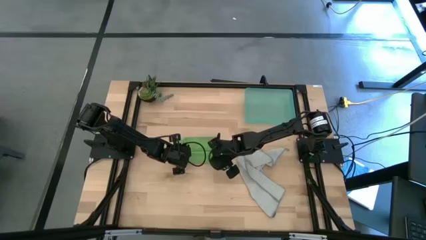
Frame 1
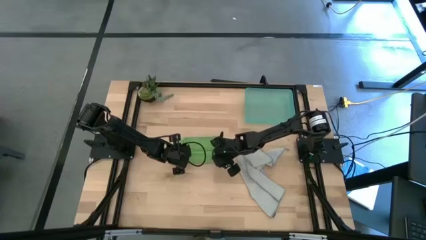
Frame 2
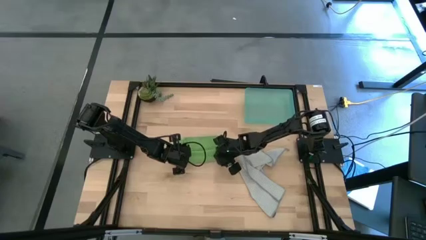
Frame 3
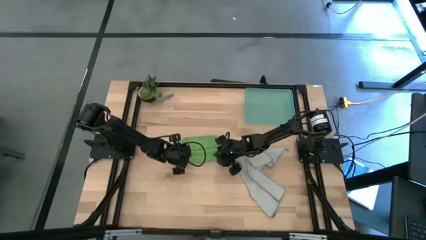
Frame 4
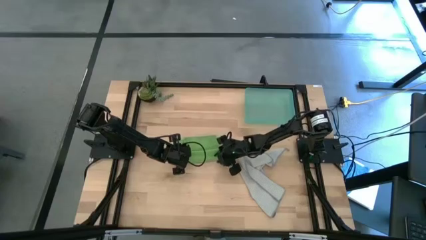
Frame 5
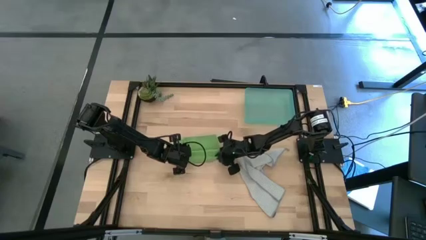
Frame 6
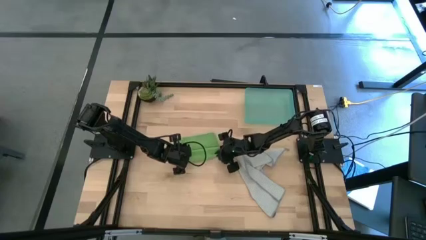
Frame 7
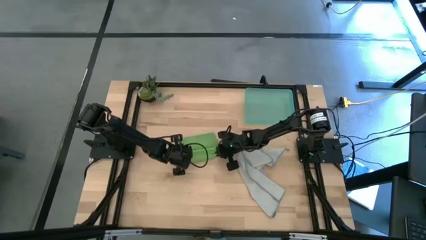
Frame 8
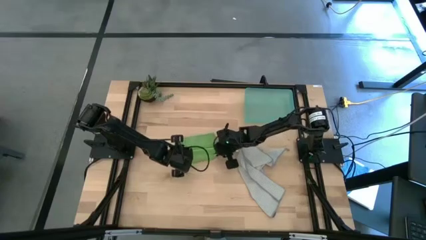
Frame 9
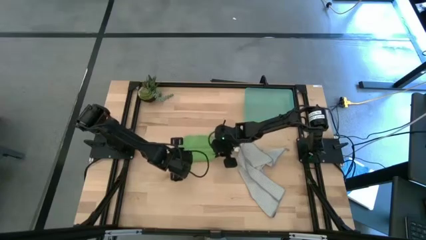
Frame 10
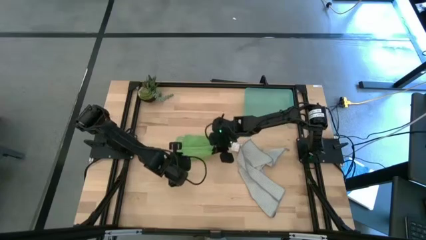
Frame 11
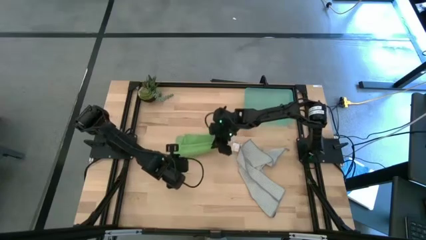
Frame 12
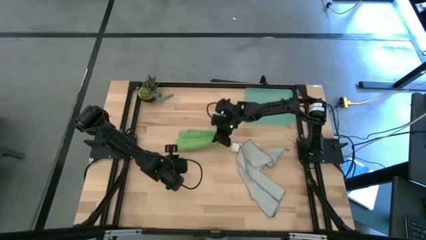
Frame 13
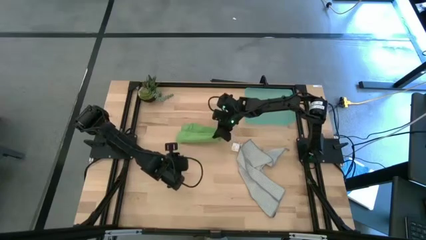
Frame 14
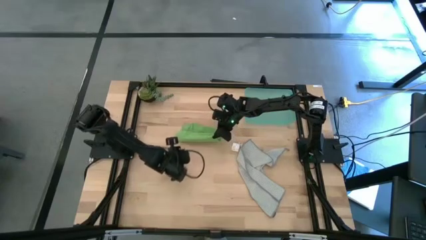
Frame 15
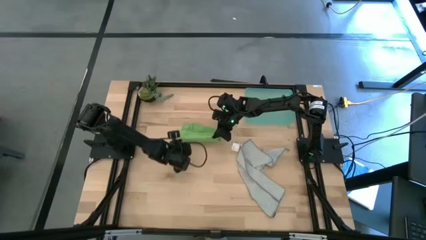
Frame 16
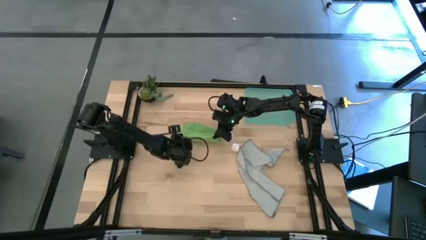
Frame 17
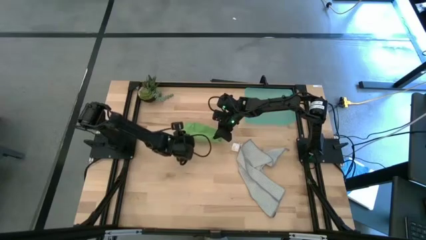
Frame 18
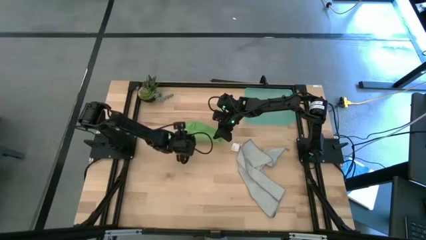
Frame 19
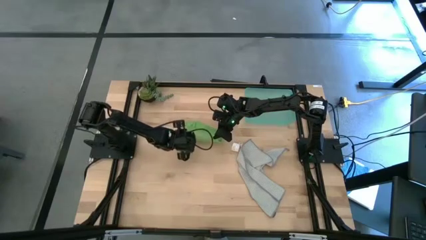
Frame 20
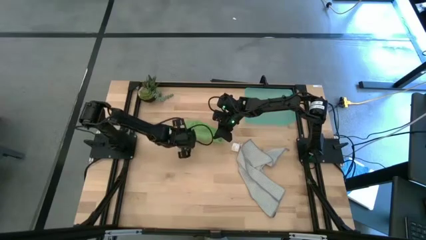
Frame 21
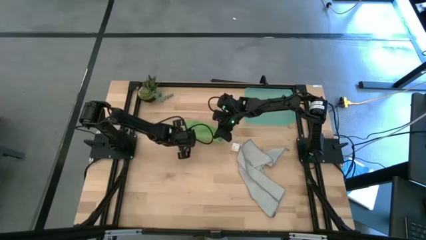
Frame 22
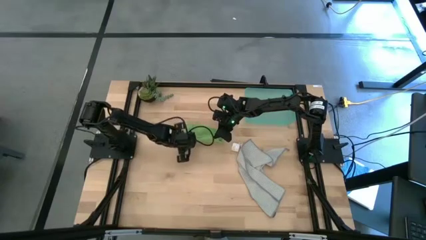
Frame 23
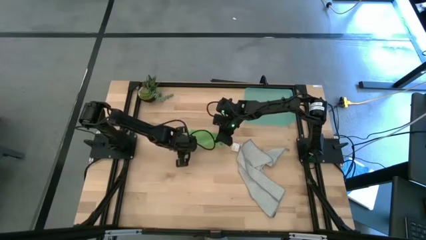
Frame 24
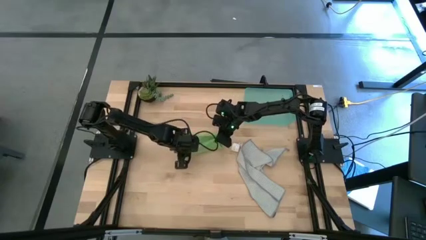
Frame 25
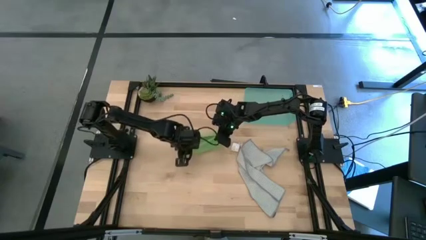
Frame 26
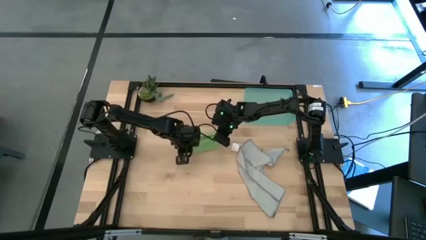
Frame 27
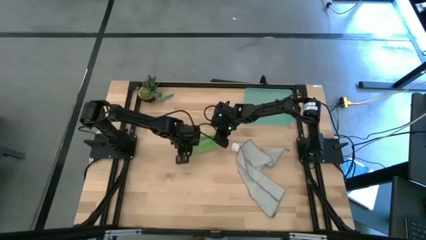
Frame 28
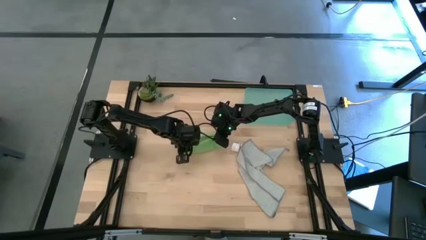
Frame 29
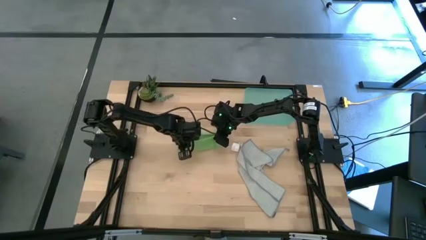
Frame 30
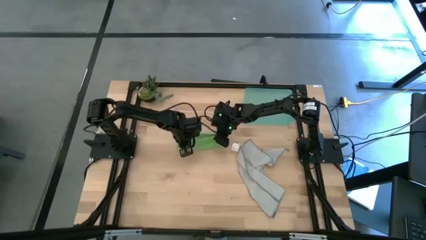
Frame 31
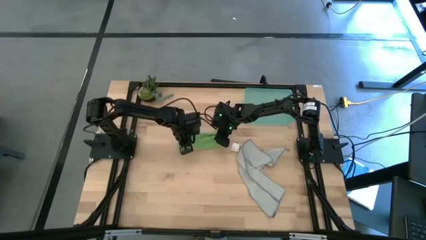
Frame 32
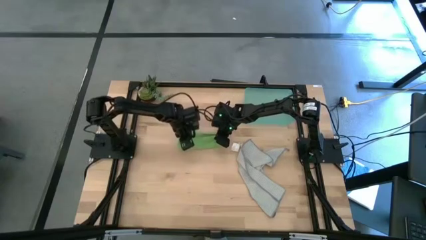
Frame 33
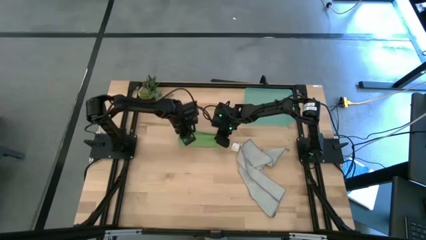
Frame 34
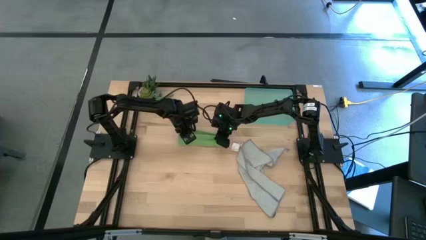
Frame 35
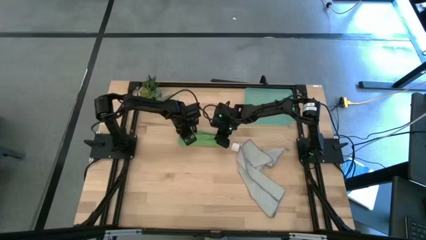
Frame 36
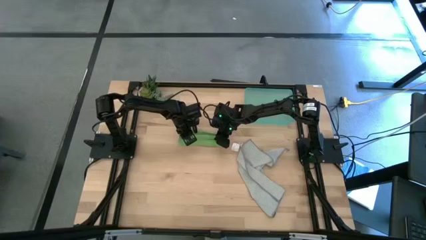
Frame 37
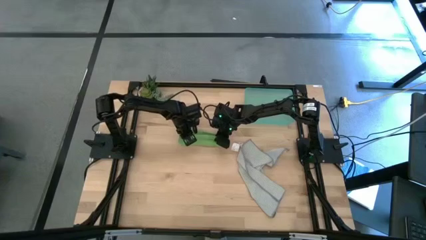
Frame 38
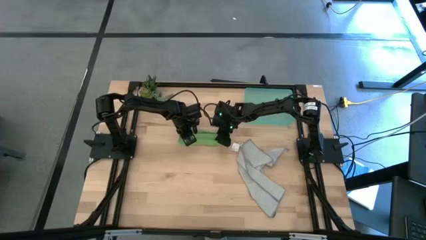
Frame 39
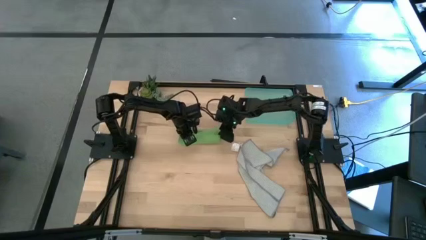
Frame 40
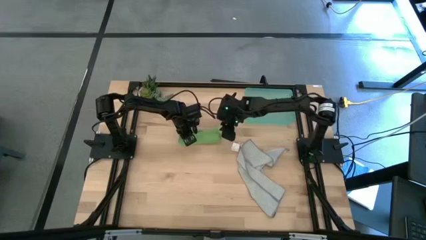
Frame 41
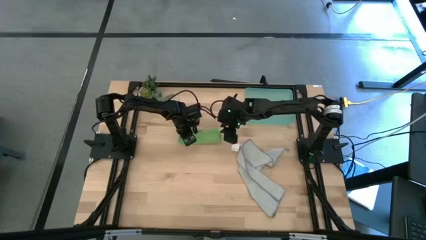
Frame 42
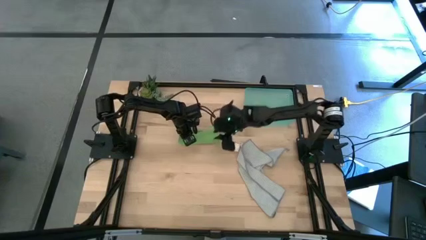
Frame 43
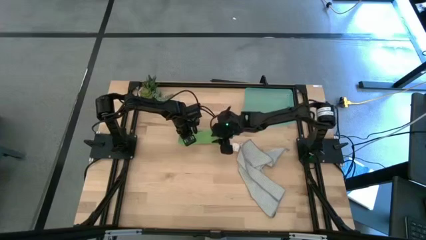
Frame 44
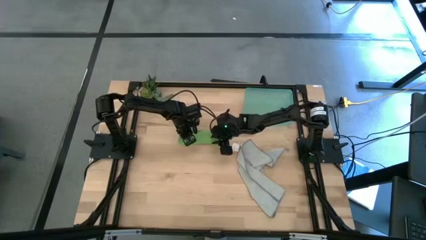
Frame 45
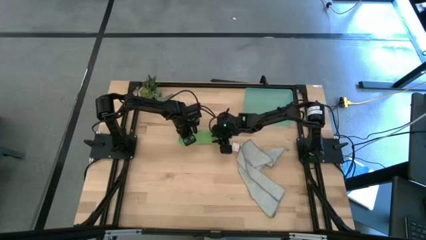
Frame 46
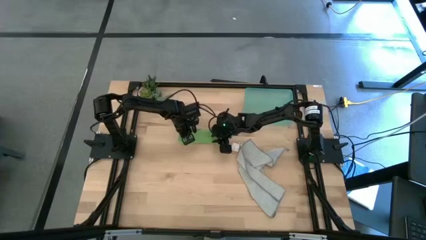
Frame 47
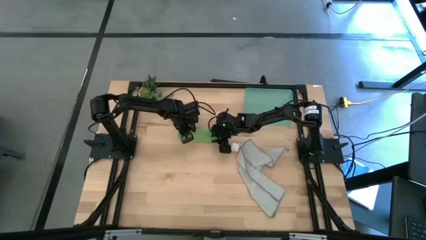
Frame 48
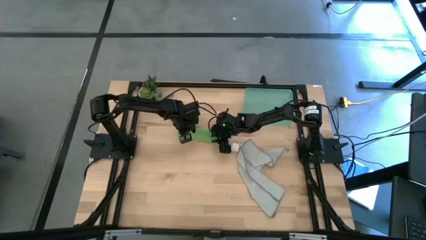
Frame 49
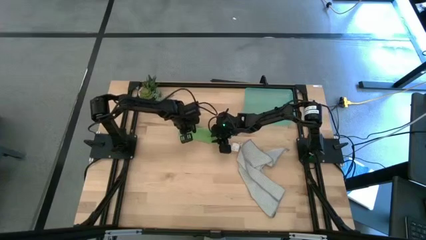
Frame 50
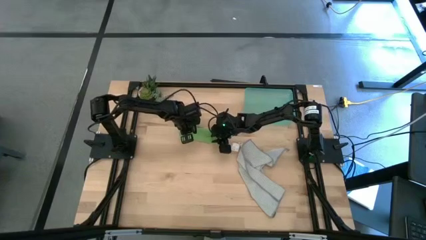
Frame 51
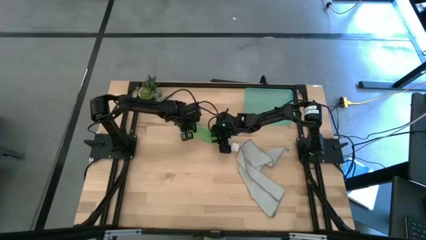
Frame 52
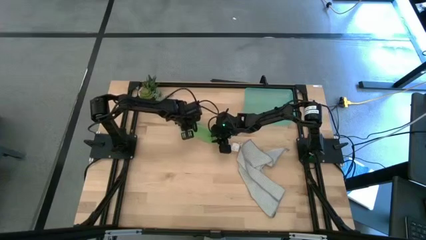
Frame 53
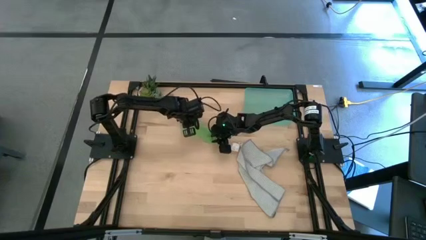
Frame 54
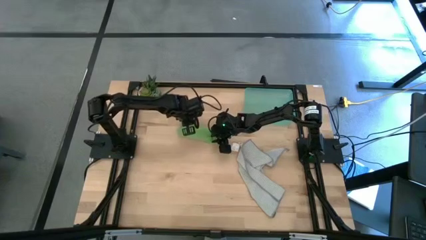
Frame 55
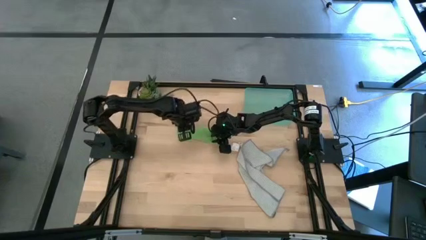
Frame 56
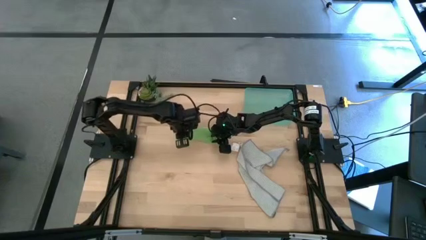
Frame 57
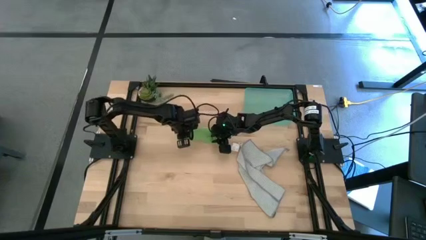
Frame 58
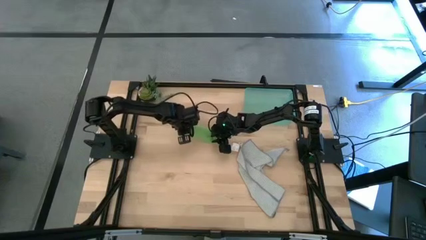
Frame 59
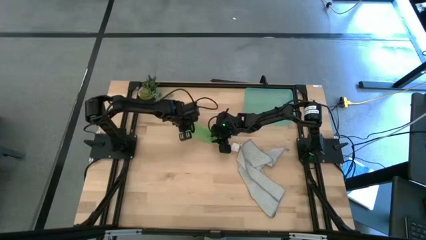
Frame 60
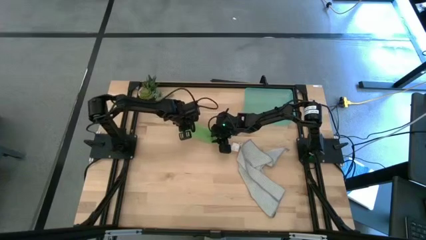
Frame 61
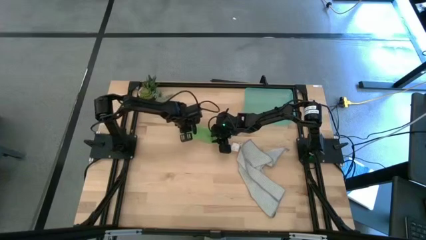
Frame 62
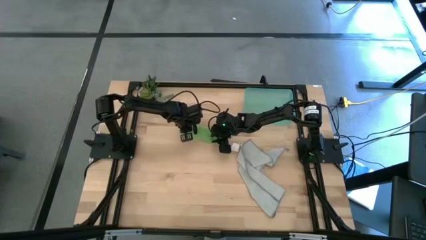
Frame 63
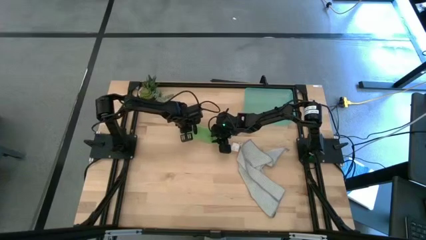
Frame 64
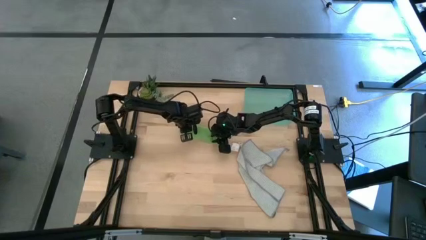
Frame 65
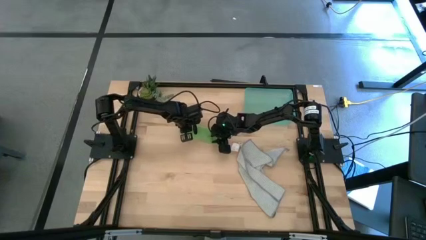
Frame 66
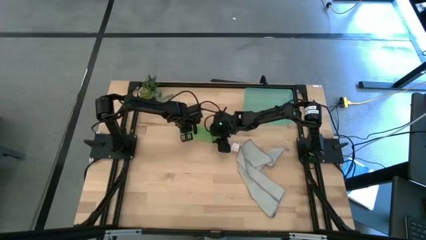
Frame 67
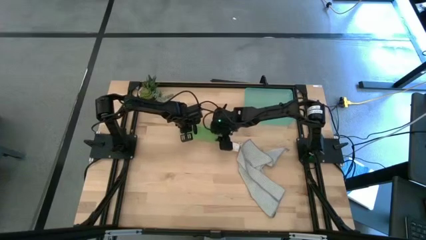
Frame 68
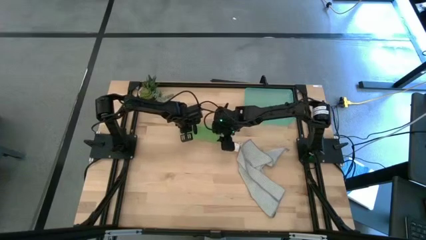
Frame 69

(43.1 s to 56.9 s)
Task: Roll microfiber towels into tight, uniform cylinder then place into a basket
Roll the green microfiber towel
